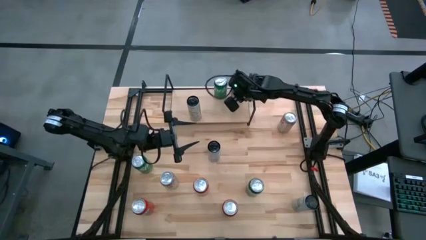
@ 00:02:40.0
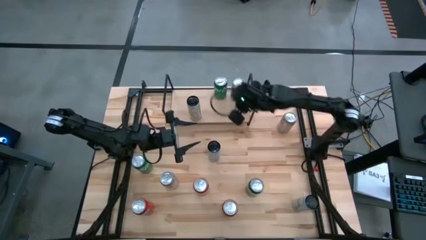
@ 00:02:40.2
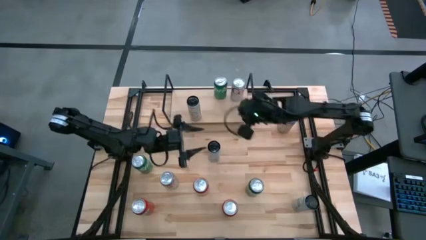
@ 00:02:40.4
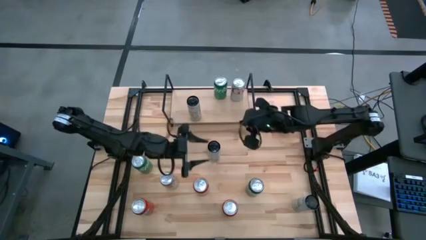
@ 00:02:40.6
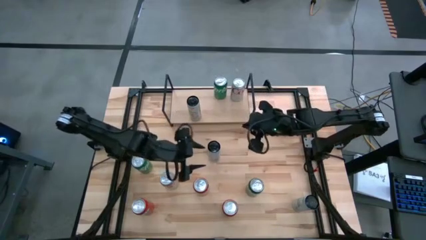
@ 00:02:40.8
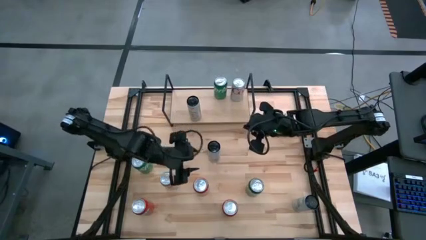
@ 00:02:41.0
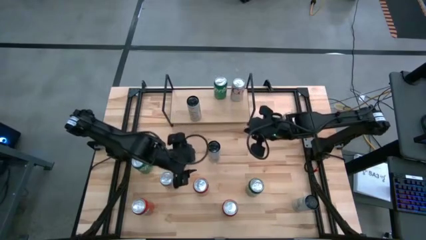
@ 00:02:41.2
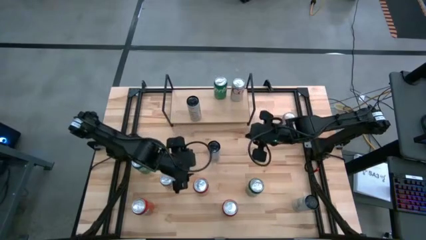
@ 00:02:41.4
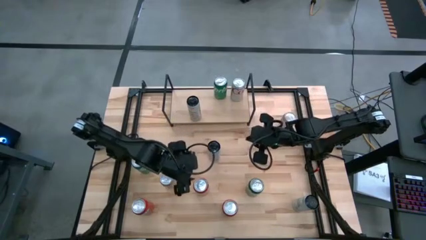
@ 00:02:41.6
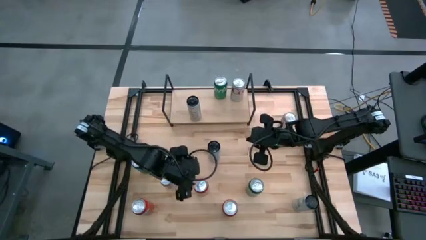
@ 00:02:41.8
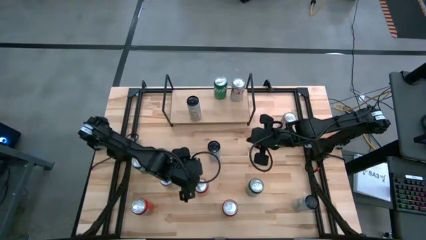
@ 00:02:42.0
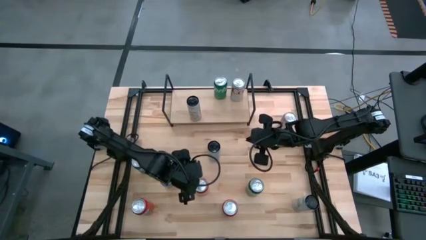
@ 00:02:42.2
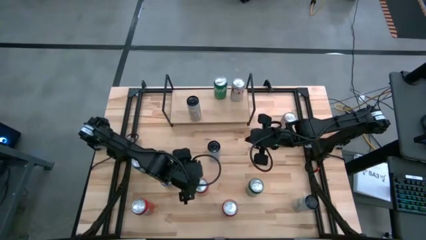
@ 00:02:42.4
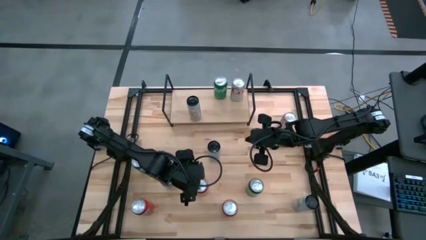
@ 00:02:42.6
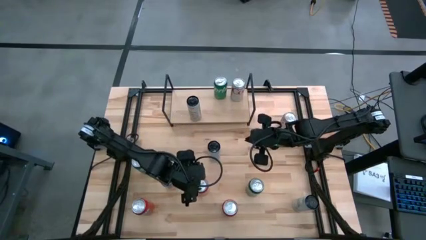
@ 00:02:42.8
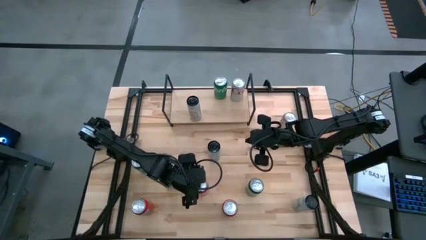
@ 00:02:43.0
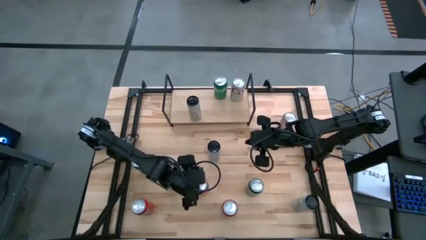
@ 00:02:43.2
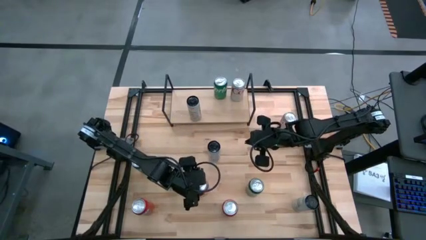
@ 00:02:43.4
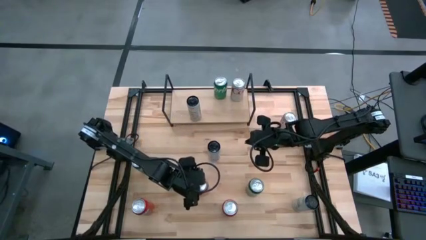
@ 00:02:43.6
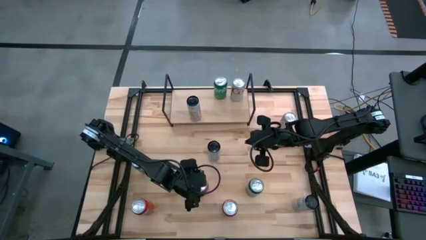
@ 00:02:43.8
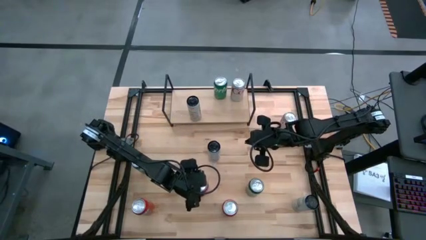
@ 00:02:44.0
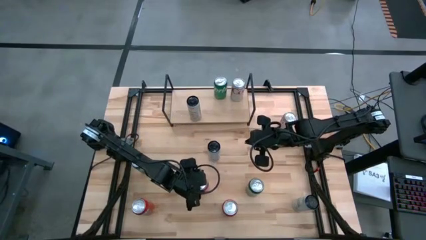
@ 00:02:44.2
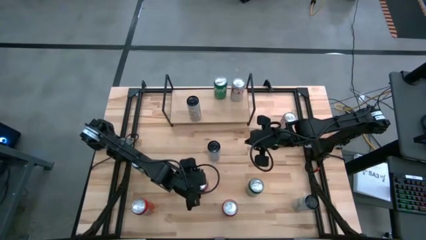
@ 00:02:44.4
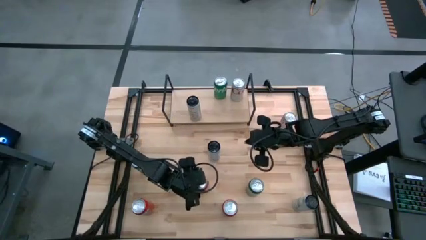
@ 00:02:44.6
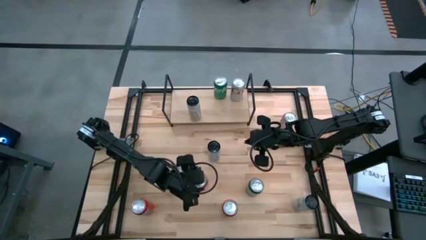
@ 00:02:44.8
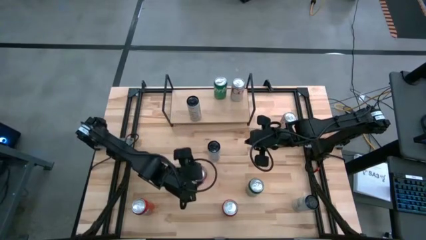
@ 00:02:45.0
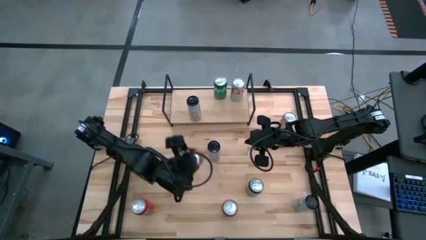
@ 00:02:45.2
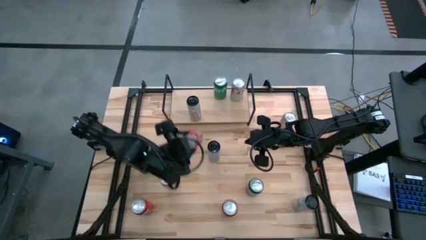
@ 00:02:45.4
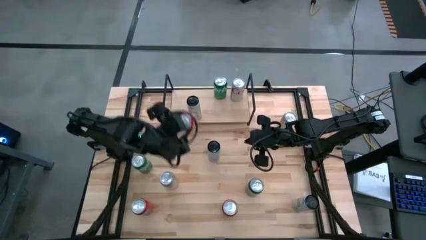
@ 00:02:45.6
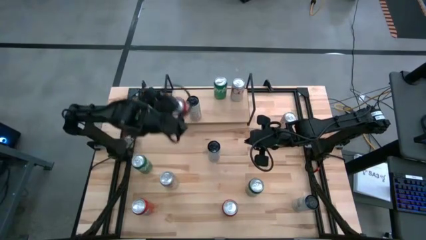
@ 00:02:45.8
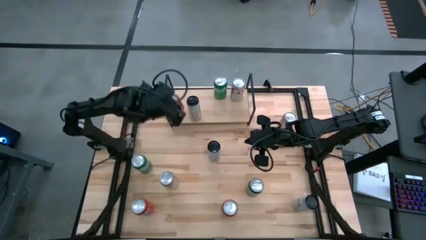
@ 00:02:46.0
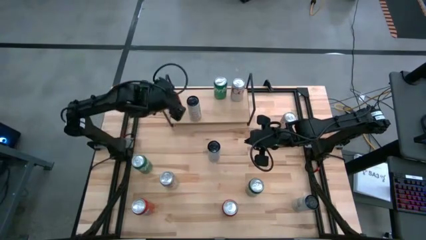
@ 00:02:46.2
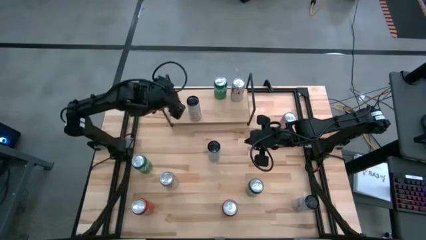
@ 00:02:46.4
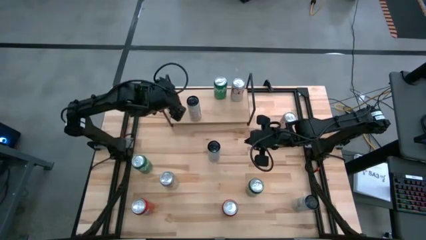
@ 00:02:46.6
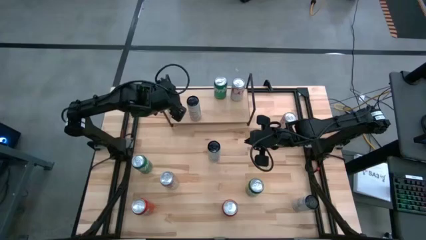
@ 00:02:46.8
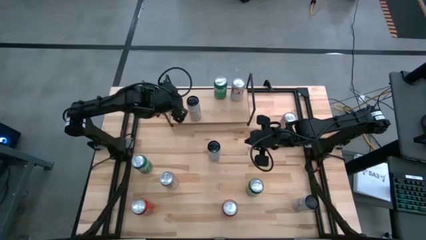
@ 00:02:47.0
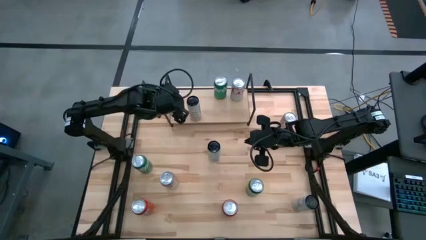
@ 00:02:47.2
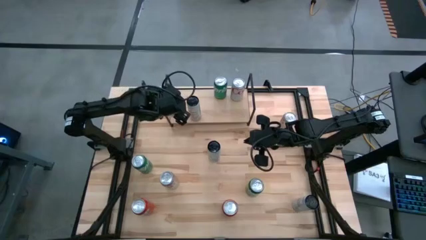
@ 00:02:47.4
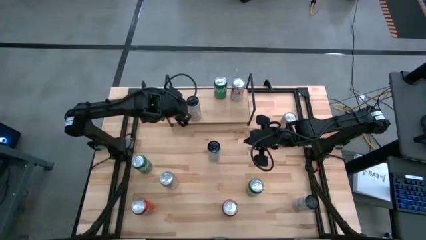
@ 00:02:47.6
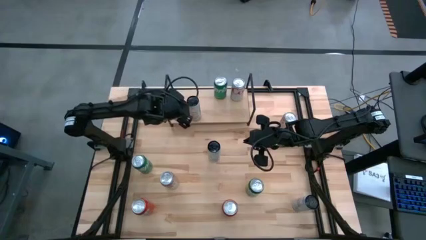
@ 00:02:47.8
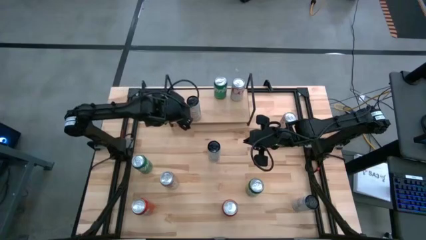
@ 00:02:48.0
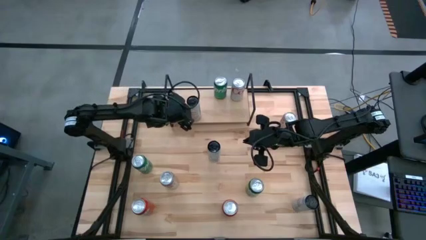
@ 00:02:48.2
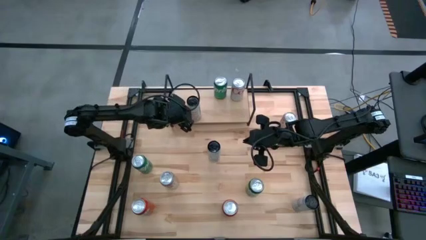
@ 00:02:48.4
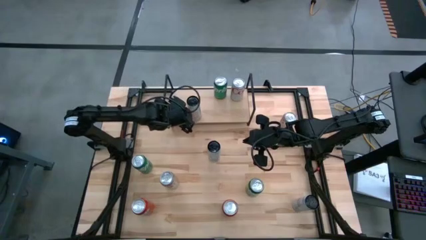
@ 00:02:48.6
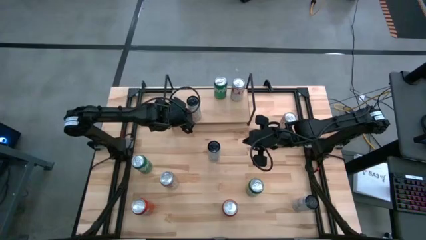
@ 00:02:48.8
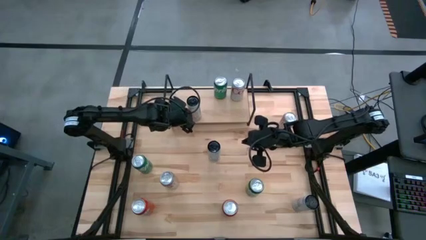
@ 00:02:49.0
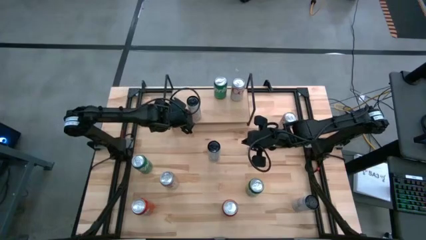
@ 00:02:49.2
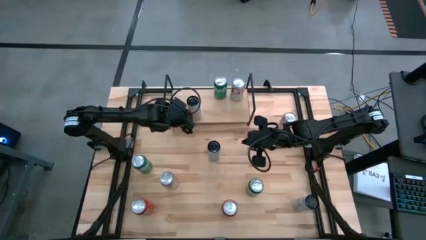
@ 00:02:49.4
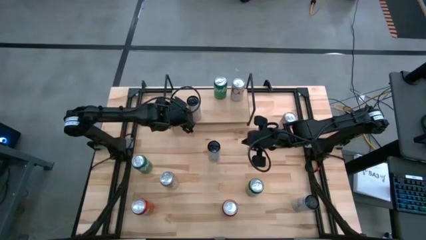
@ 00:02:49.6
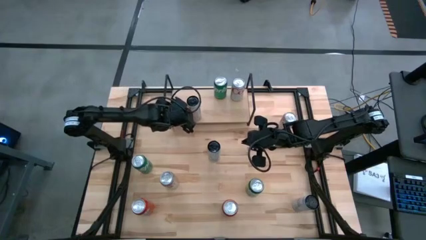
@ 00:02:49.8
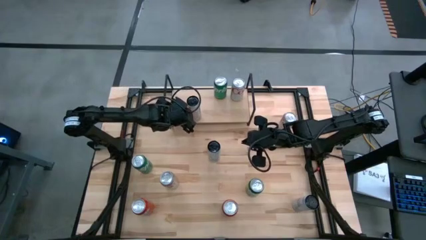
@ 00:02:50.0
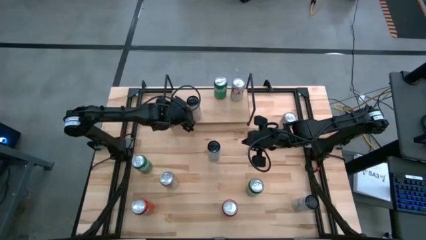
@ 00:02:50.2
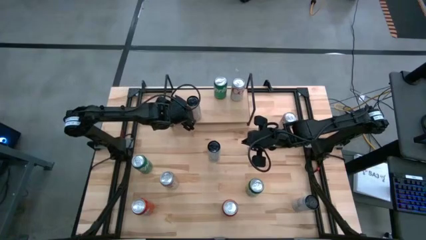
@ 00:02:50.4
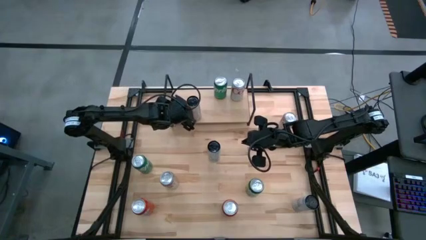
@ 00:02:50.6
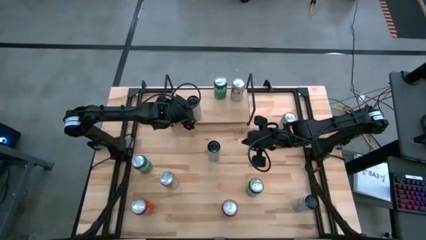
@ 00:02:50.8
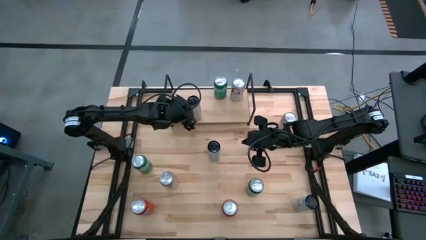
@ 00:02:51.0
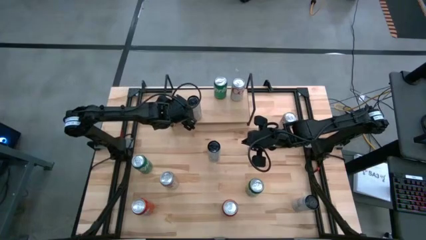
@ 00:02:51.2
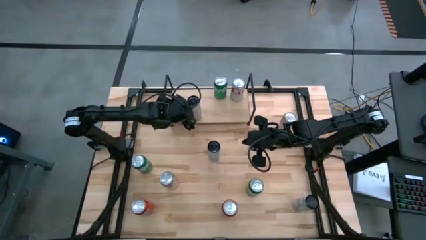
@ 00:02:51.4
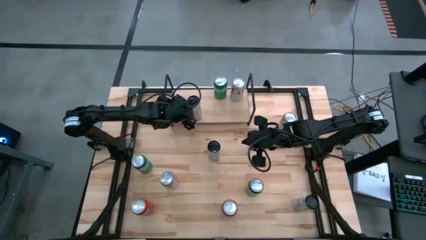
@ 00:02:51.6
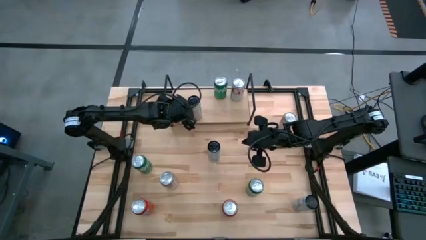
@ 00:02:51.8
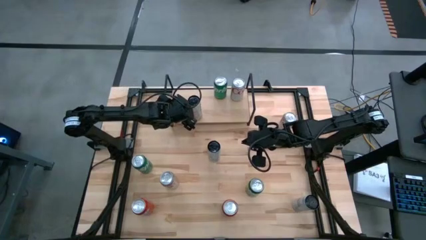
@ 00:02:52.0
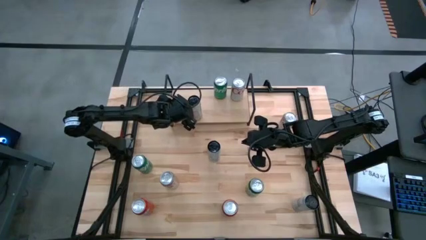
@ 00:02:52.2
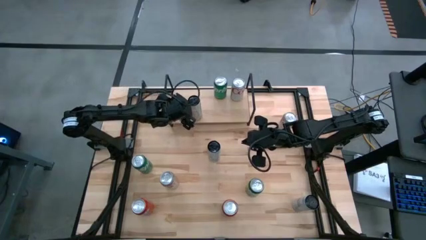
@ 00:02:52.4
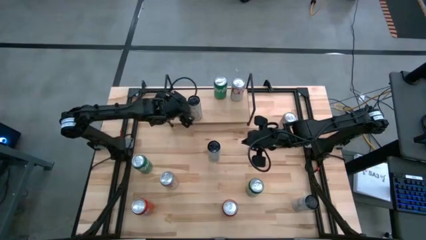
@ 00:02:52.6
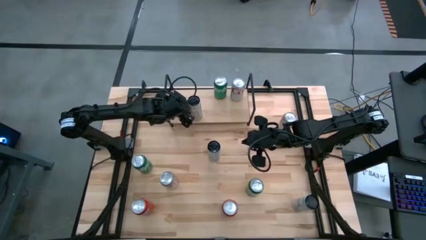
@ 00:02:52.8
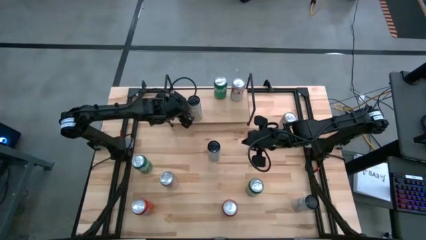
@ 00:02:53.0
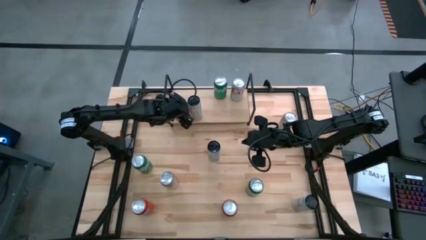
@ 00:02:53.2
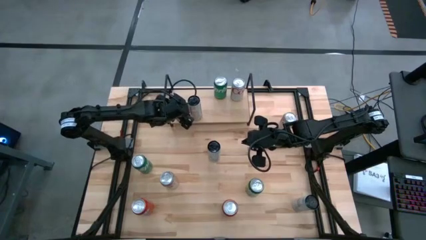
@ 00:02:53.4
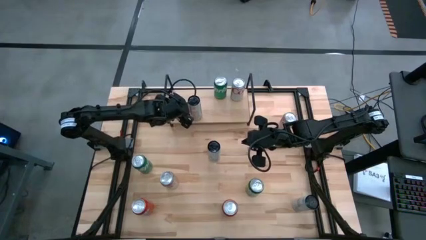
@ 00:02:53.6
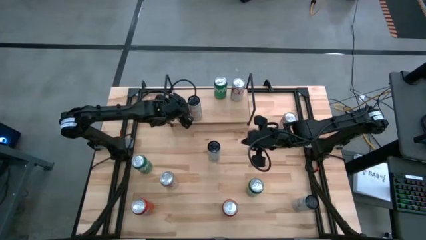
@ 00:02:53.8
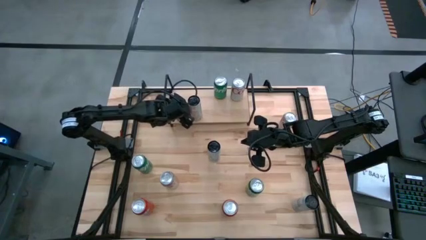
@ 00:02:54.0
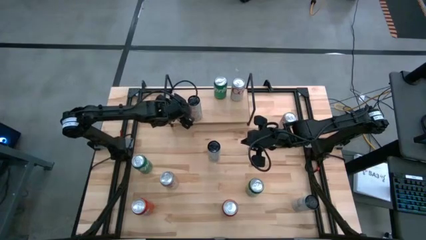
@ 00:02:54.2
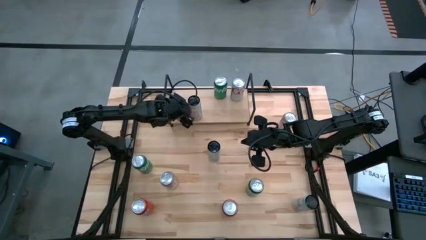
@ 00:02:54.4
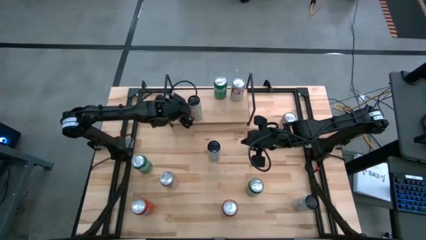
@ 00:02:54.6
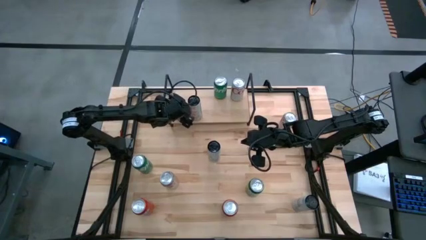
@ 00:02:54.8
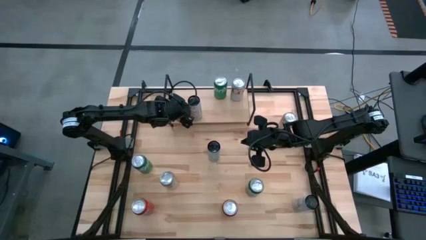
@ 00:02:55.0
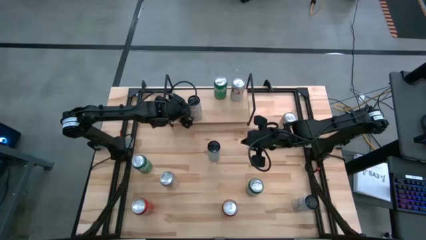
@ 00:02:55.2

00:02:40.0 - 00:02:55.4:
Task: Sort soda cans
Put the top red soda can on the shelf
